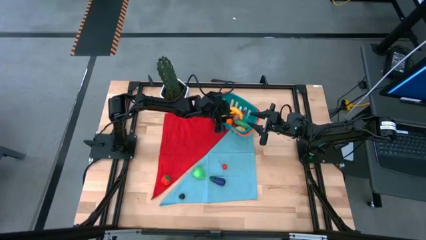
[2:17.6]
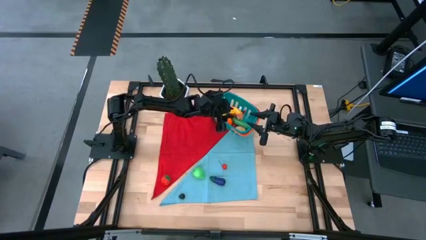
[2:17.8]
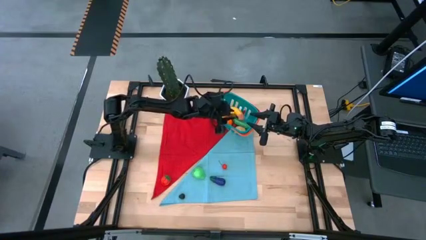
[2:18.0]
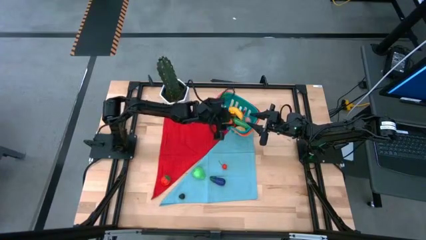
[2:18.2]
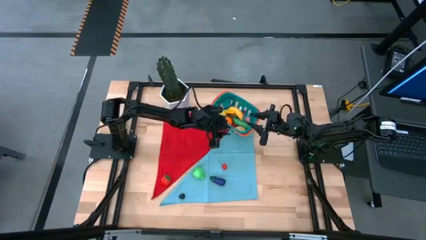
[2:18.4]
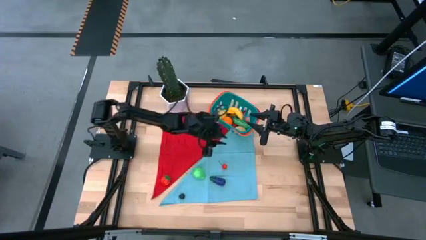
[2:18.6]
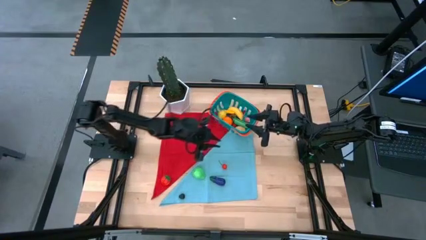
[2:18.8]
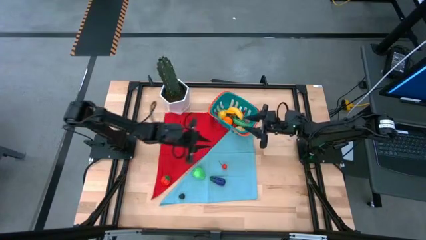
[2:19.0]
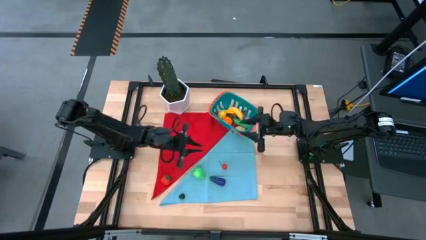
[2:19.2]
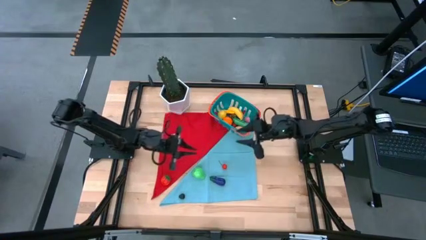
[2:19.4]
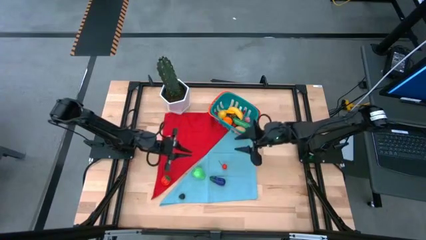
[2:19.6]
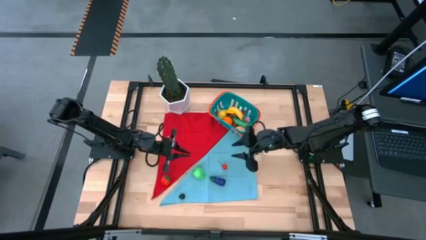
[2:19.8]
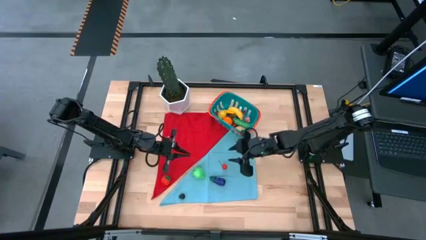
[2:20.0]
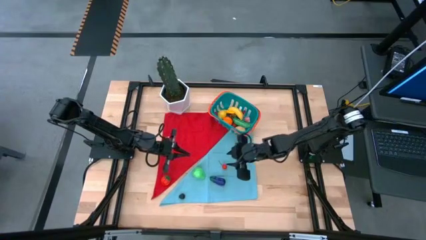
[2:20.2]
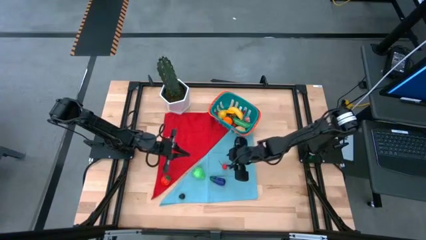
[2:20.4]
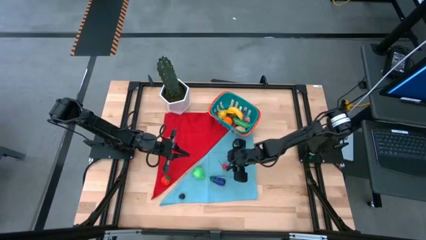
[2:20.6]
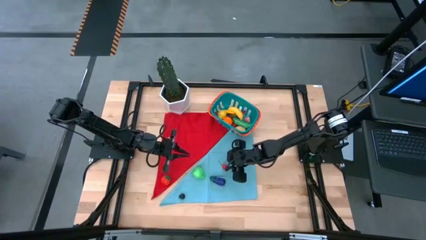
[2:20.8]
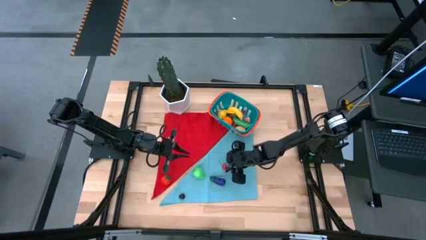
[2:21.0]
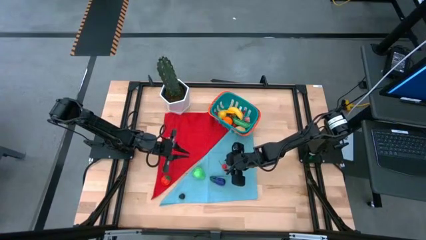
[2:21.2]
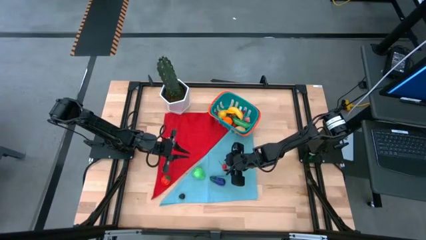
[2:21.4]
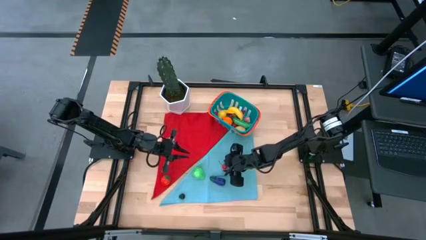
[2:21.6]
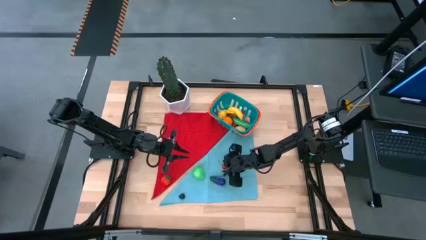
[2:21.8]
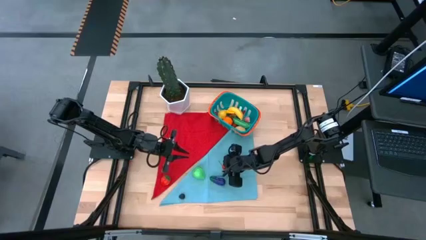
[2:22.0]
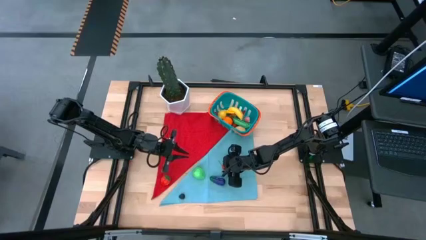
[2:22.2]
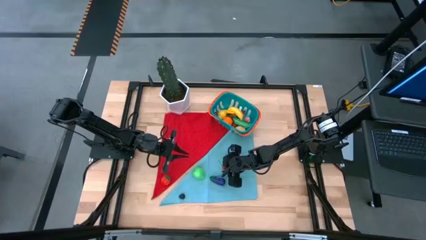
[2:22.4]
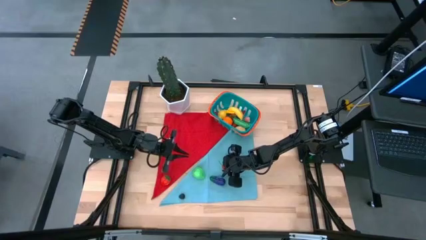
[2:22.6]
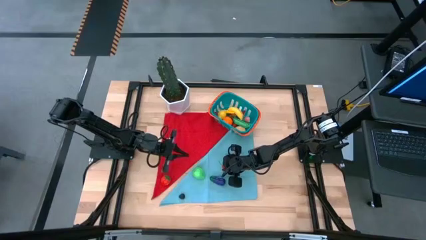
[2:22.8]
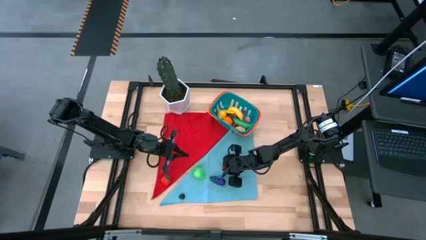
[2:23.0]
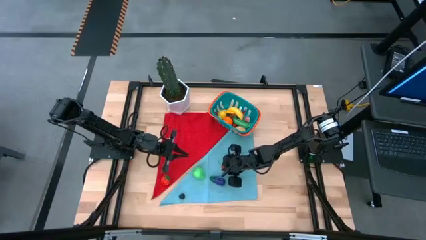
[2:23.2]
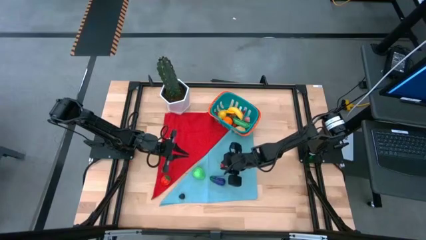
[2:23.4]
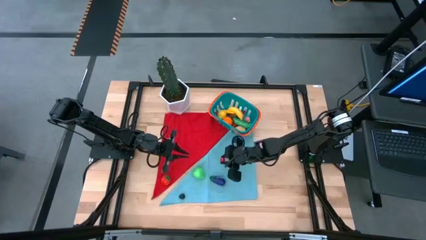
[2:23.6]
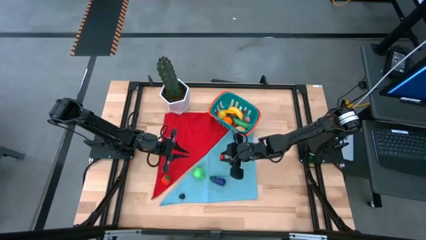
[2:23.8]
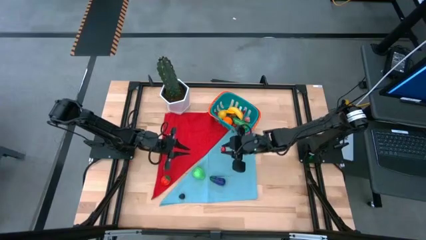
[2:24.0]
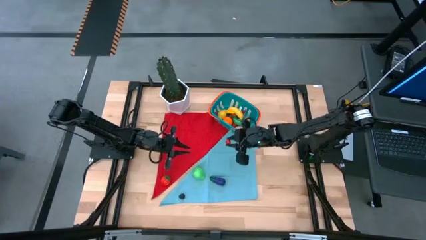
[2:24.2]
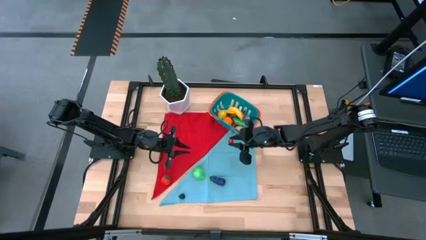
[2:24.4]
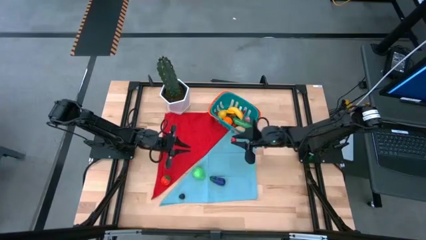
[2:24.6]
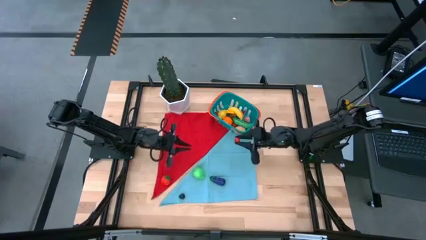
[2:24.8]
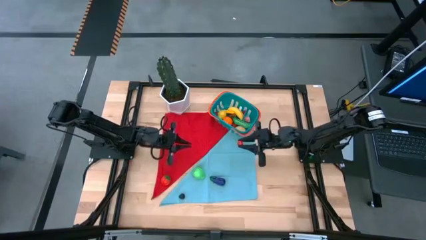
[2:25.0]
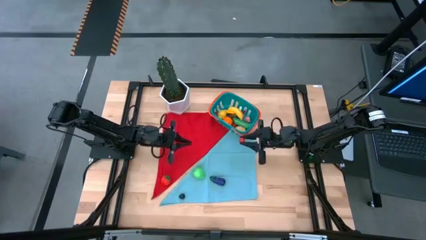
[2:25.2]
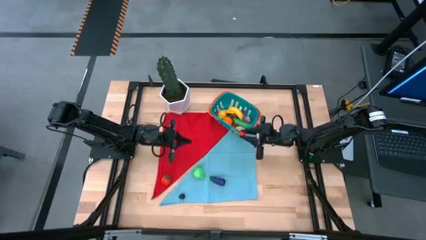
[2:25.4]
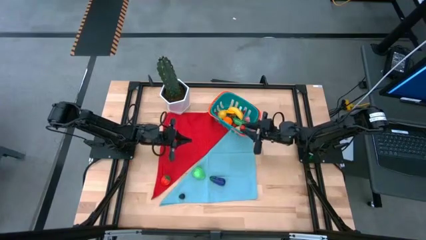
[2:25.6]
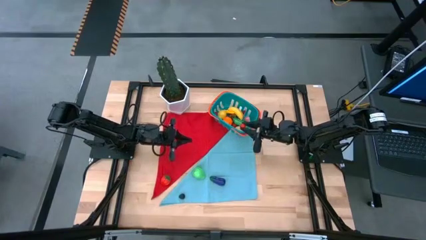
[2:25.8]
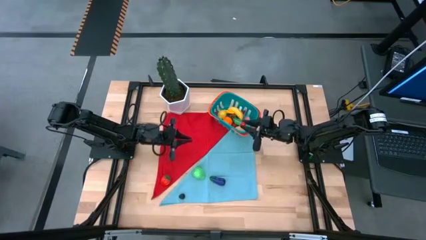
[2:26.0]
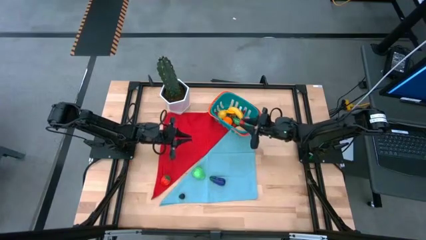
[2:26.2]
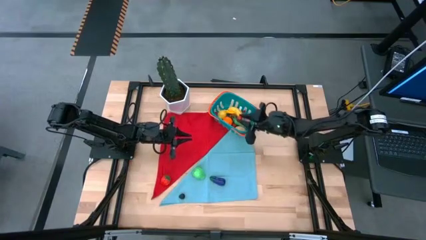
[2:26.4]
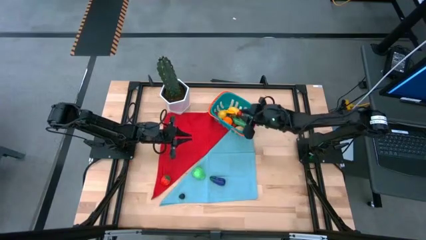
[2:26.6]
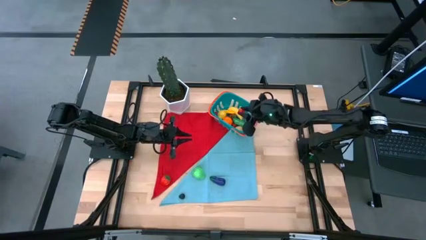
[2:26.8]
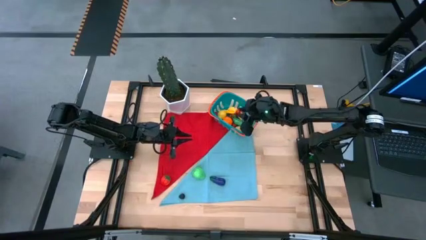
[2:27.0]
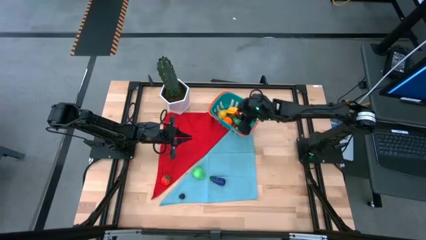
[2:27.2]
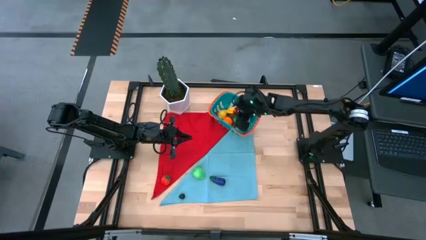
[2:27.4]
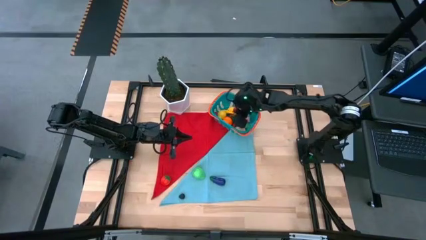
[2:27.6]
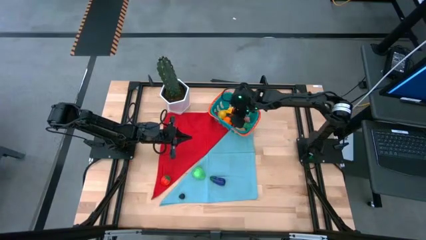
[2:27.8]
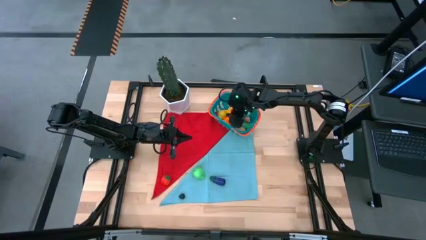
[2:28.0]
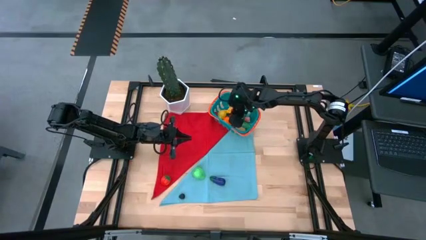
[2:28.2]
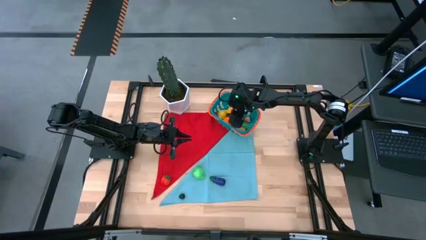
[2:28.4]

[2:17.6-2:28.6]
Task: Pick and placing Produce into tupperware
Put the red cherry into the blue basket
